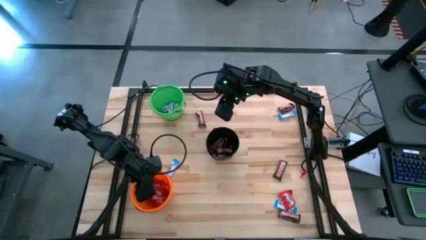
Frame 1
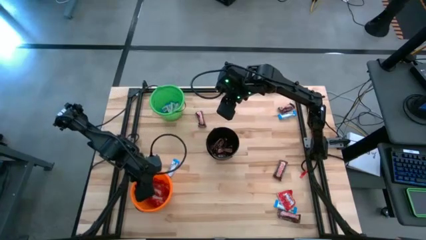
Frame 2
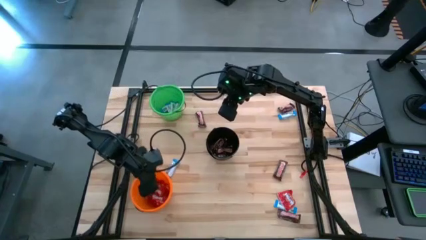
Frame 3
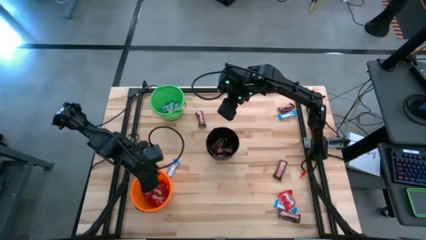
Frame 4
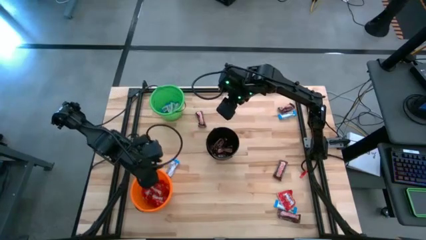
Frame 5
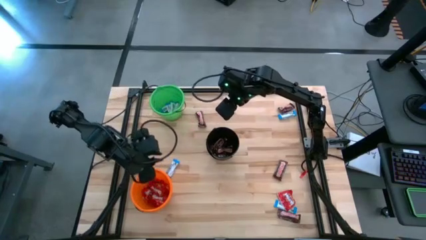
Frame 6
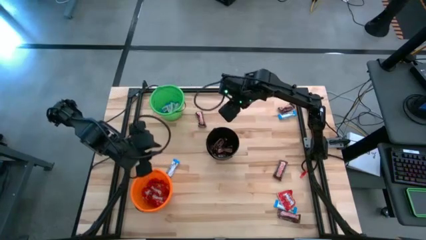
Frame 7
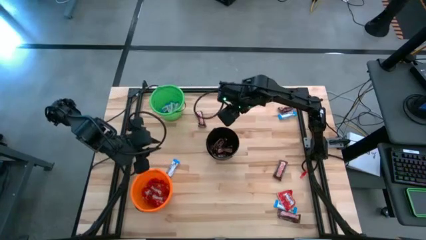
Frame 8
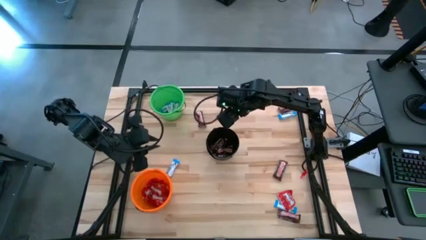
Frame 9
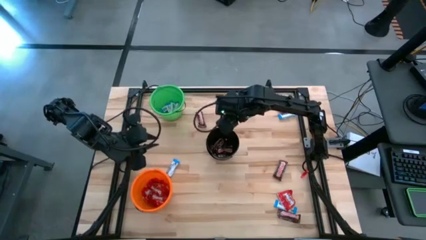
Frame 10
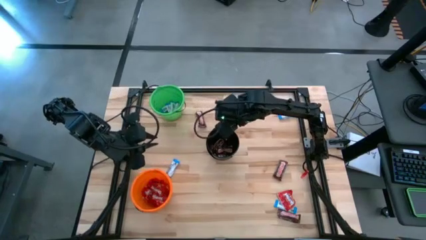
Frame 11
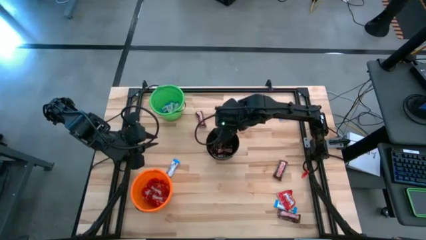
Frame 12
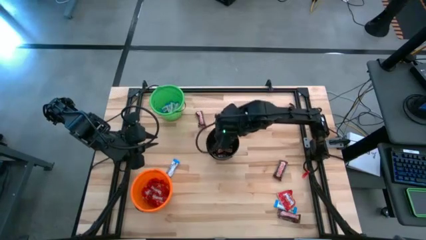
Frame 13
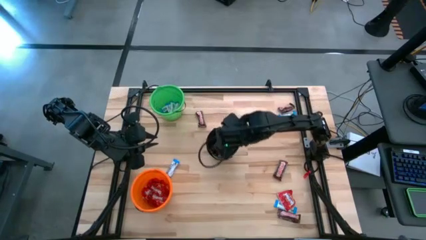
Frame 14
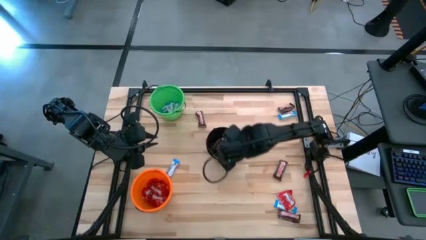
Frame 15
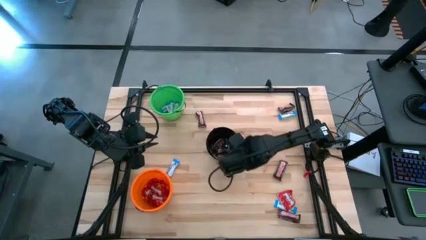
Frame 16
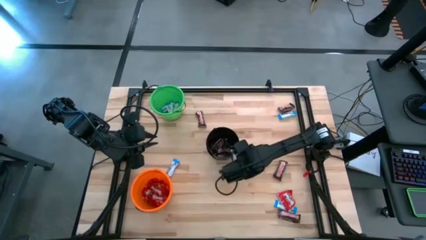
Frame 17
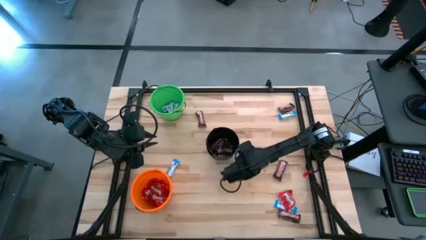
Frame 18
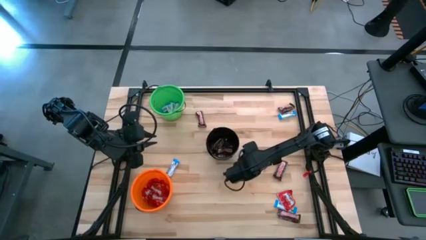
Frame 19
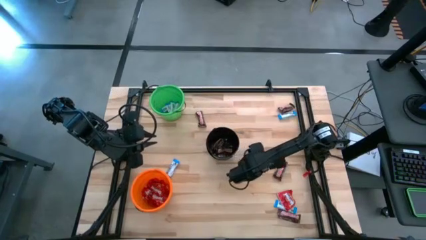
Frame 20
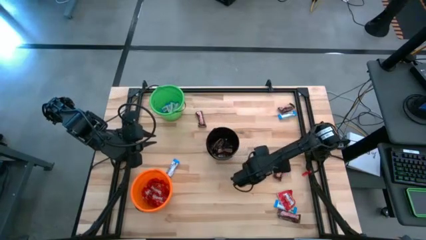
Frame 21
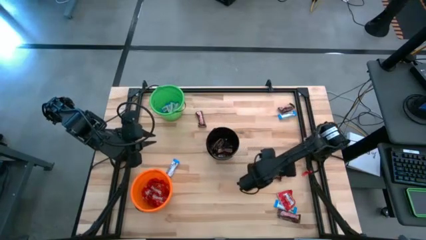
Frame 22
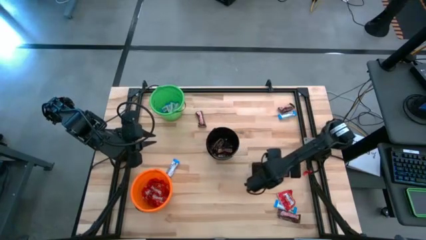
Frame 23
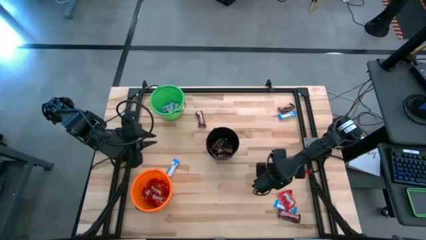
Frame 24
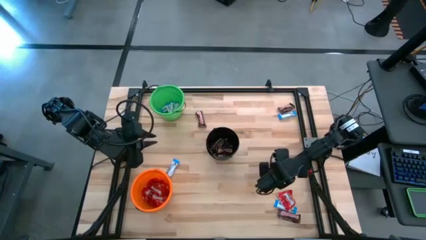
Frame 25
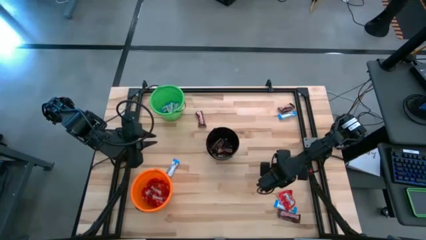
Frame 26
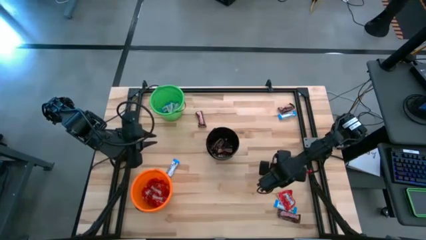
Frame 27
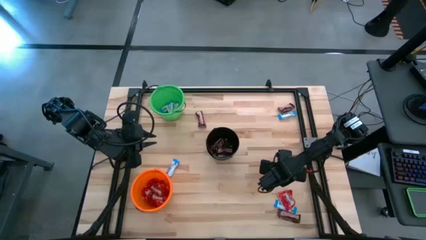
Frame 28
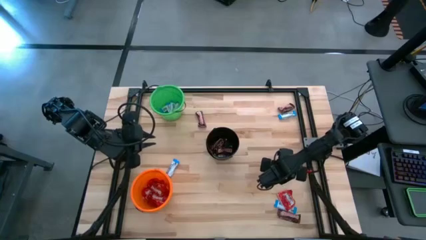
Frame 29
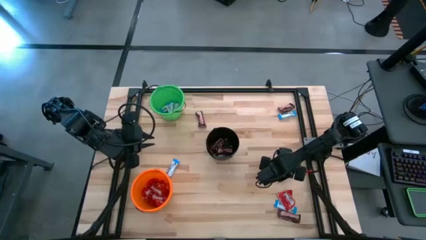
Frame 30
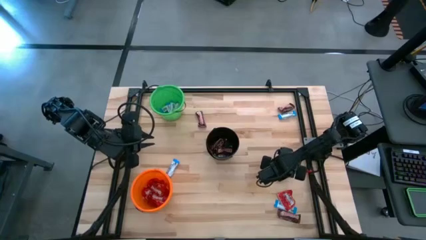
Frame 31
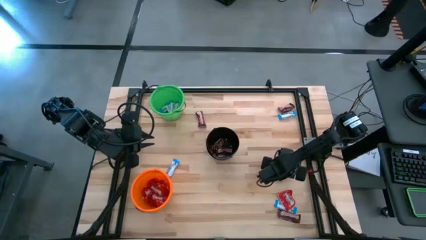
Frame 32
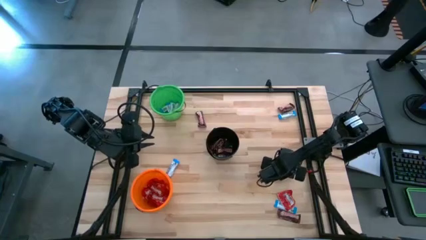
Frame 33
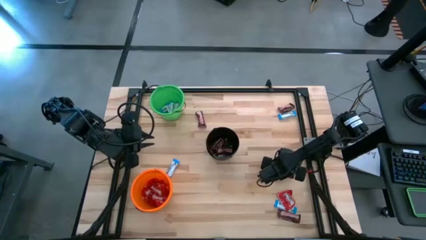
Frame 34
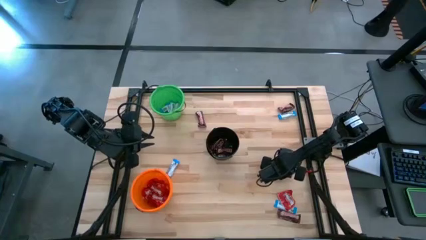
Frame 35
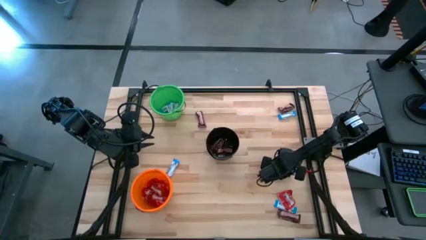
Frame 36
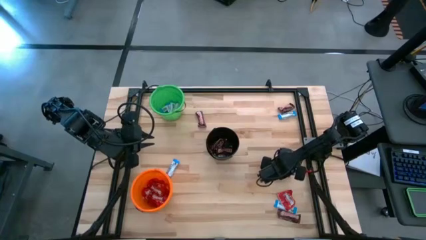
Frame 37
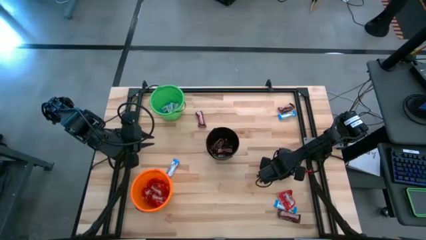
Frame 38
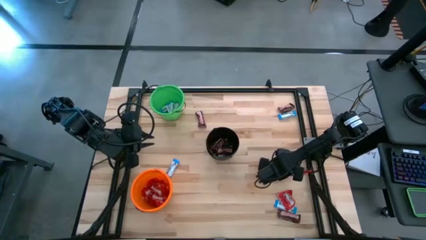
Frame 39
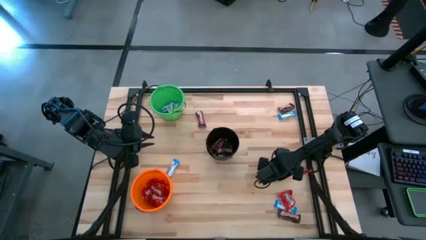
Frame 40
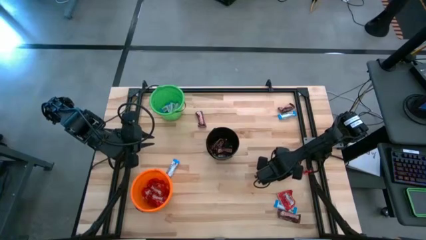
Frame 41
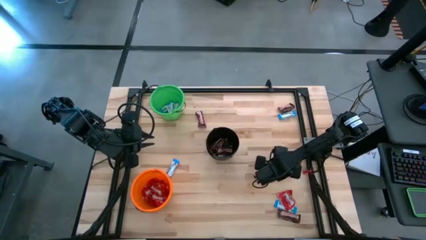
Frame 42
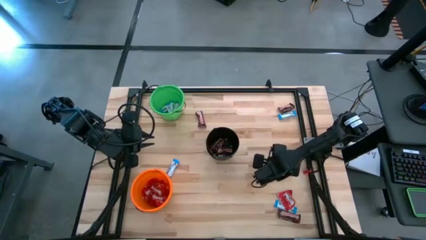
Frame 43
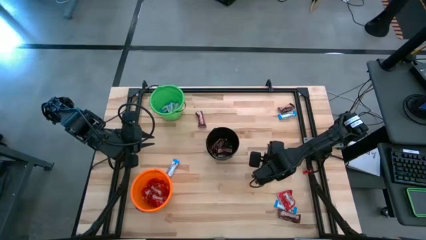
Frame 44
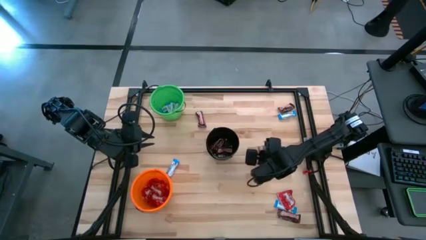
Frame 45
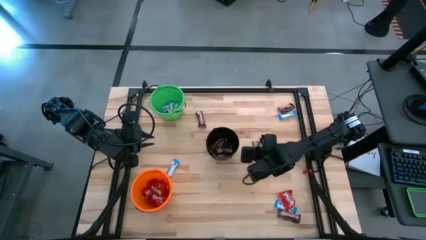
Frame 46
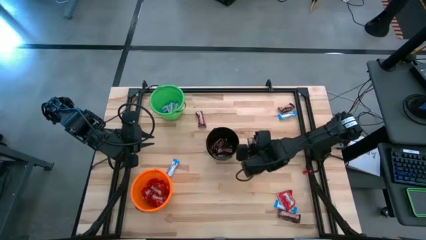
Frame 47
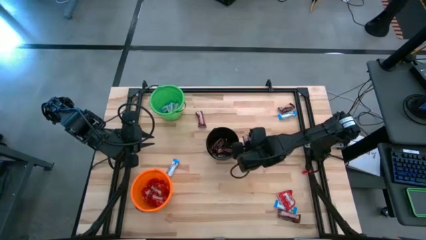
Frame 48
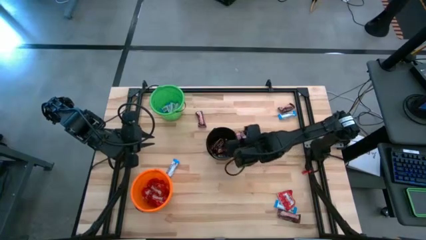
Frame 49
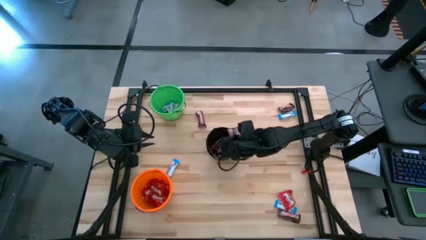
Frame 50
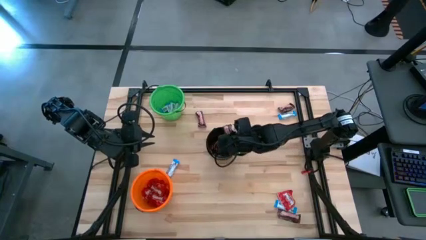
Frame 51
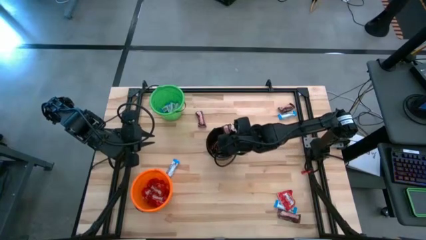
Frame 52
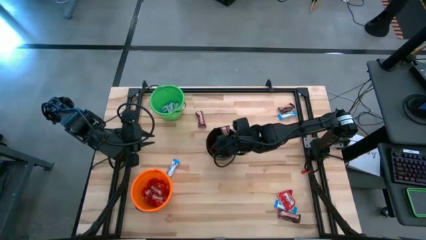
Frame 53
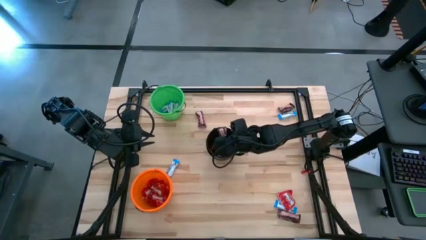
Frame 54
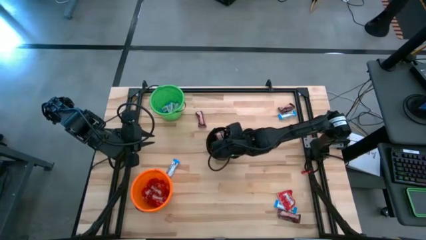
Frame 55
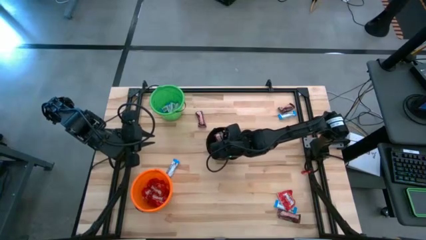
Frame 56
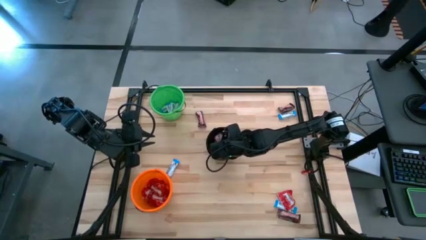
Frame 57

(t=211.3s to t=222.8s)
Task: Sort candy
Put the brown chocolate into the black bucket

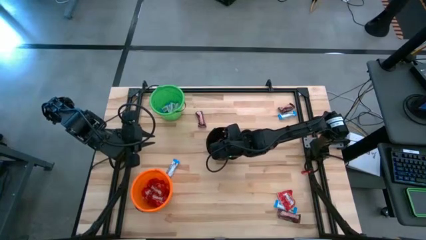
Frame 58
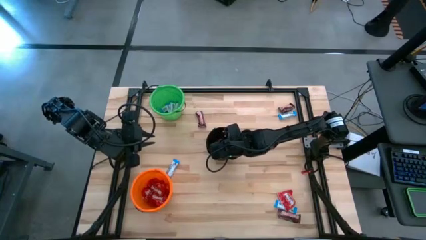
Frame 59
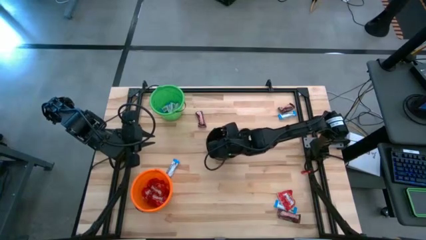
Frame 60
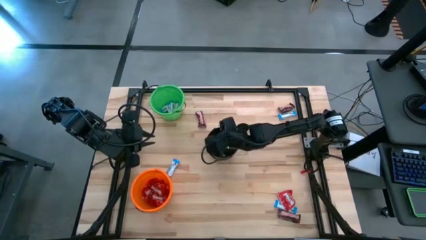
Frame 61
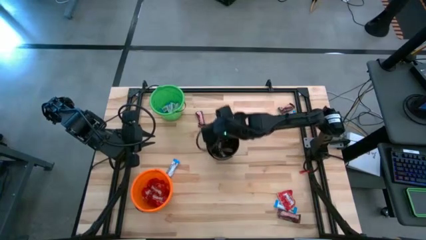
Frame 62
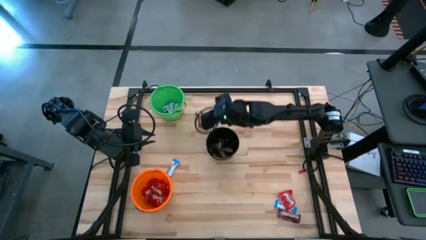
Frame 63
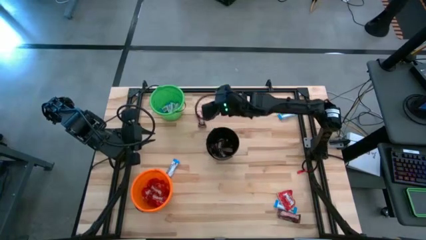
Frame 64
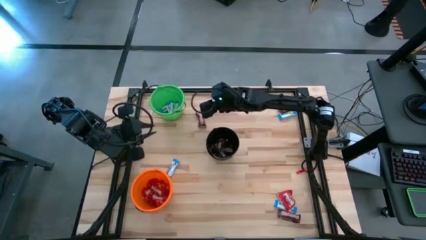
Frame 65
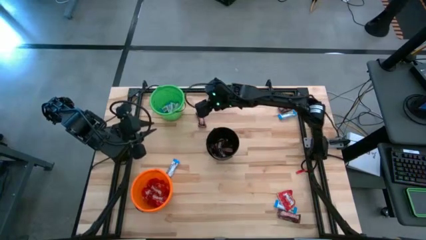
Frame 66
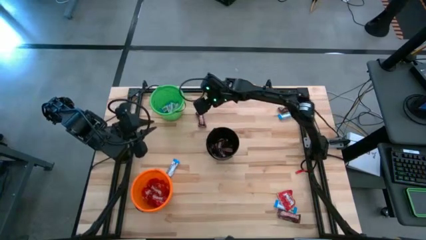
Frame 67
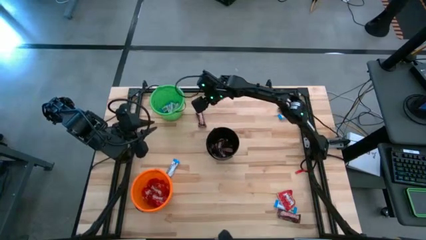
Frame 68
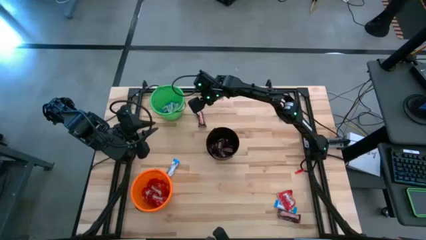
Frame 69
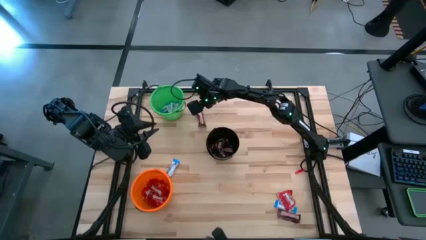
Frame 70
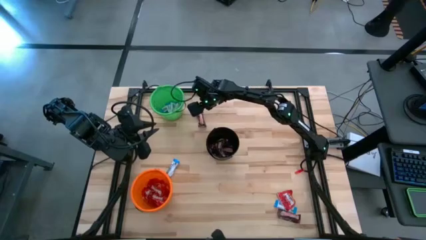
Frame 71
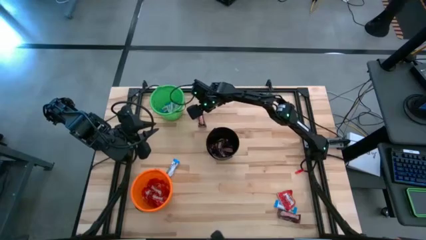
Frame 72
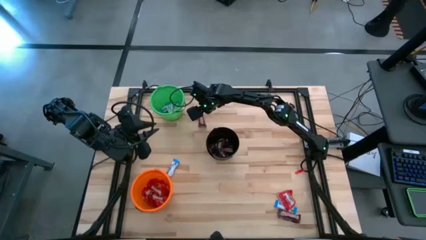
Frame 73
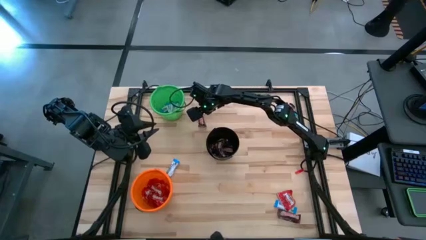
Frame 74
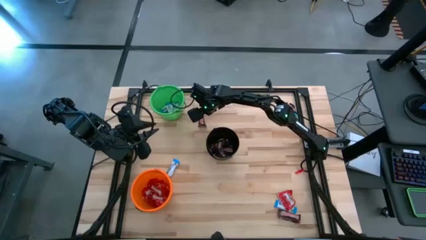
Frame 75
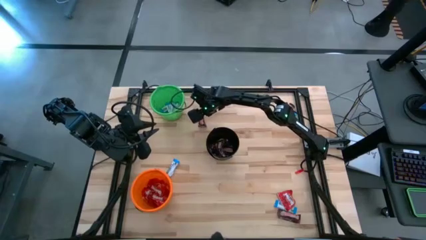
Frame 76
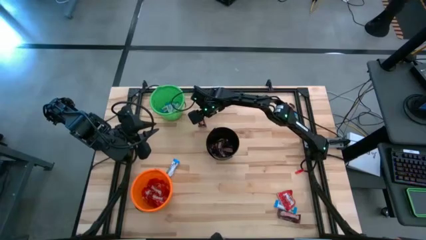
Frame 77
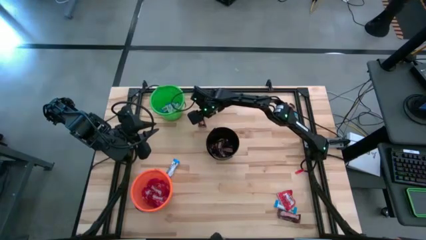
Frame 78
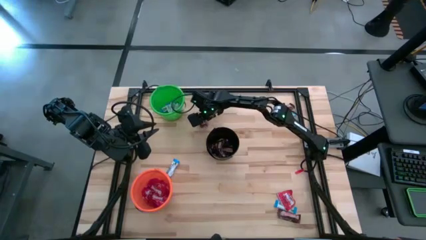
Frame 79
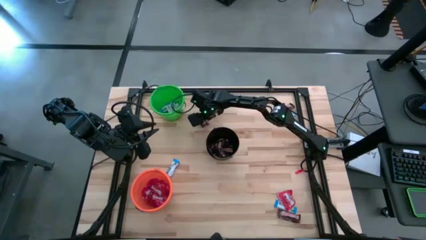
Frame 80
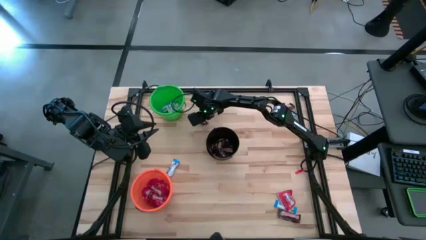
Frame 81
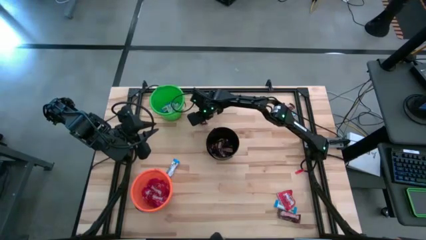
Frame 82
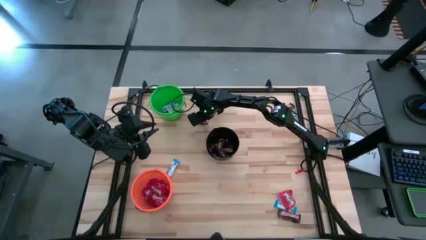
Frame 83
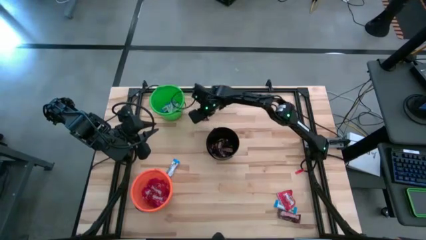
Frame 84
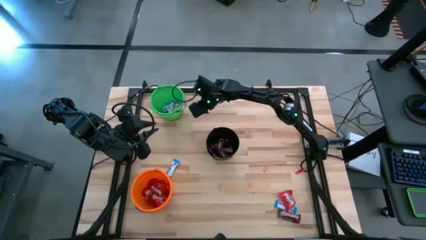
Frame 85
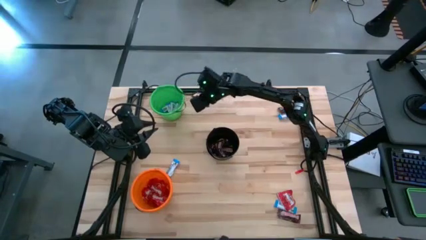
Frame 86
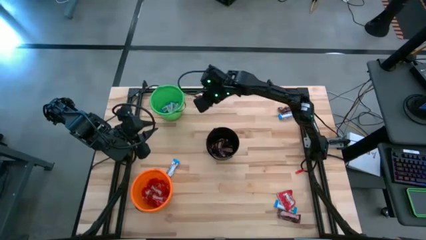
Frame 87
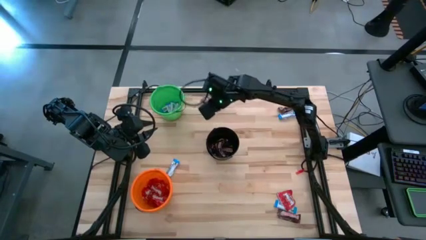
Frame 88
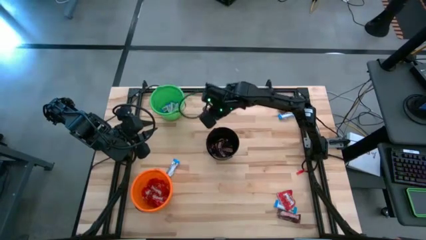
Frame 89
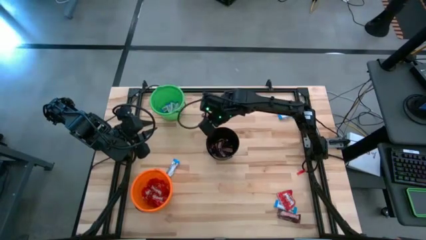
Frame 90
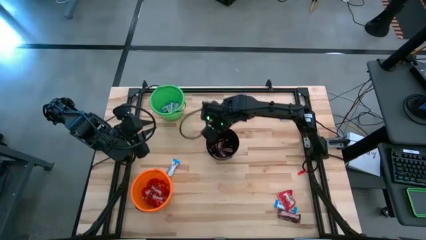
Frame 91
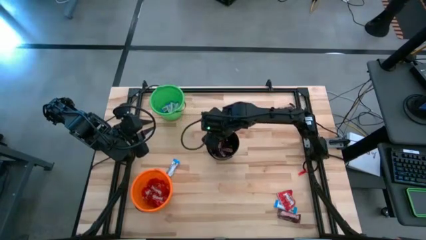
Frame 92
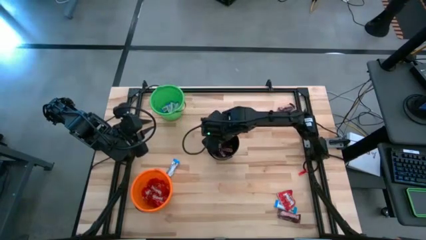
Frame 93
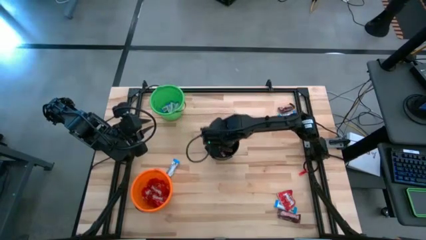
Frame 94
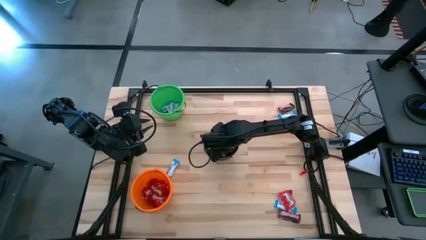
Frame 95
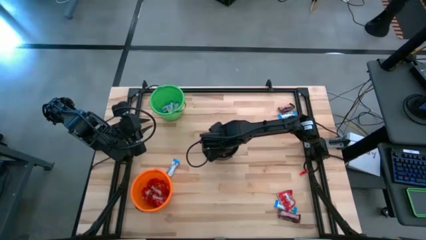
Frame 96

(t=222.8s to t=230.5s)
Put the top left brown chocolate into the black bucket
